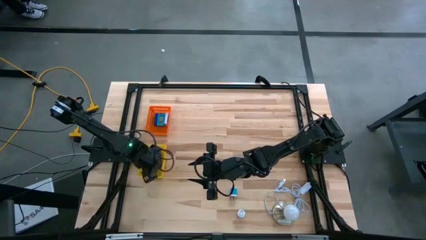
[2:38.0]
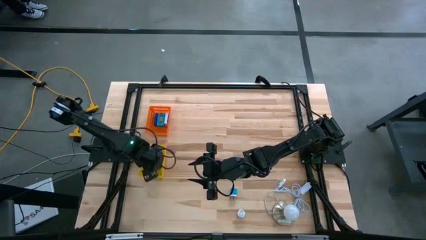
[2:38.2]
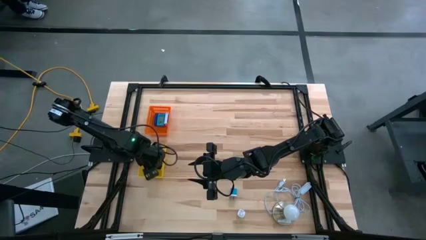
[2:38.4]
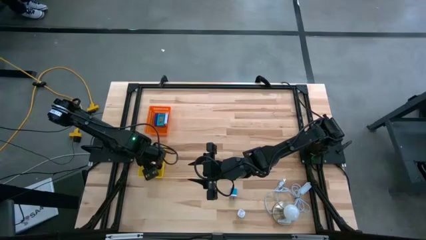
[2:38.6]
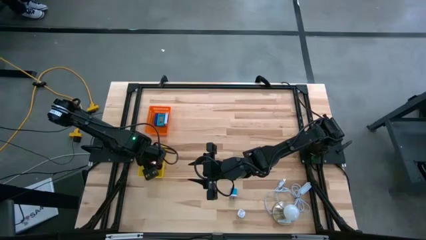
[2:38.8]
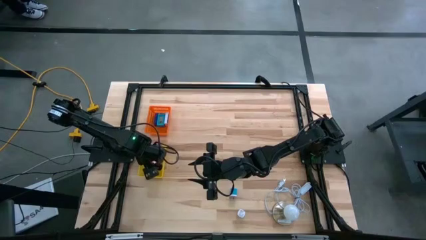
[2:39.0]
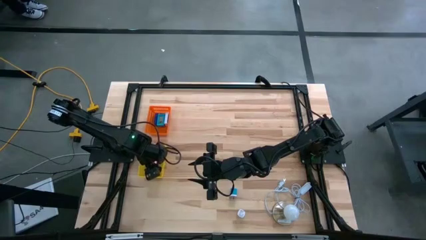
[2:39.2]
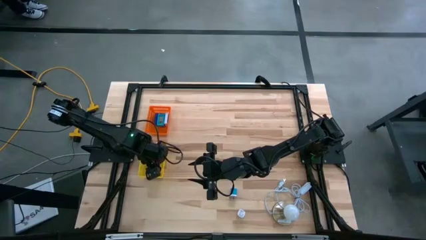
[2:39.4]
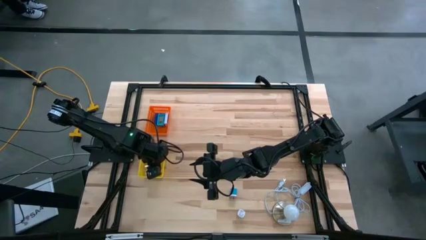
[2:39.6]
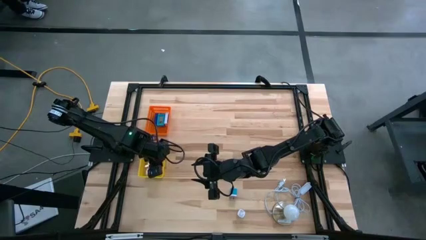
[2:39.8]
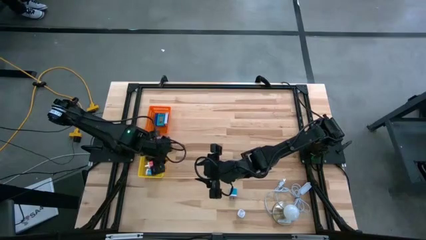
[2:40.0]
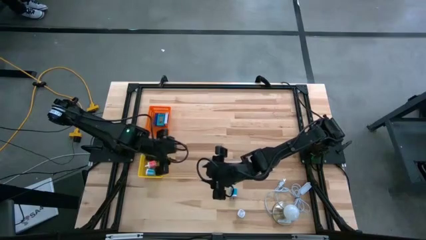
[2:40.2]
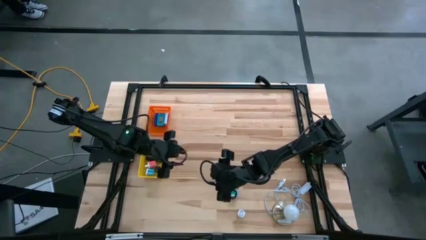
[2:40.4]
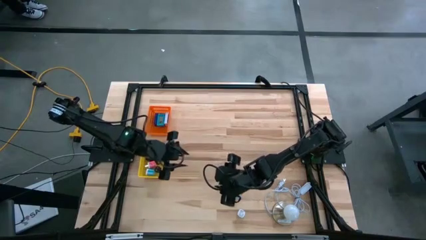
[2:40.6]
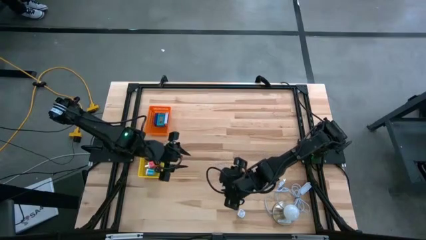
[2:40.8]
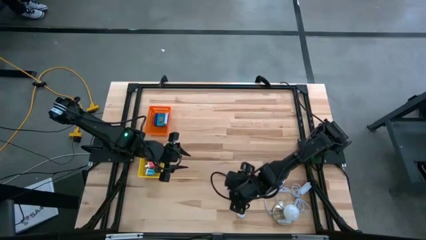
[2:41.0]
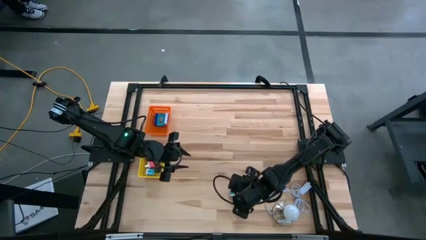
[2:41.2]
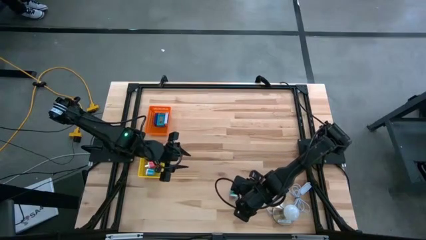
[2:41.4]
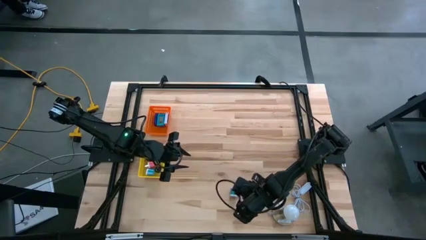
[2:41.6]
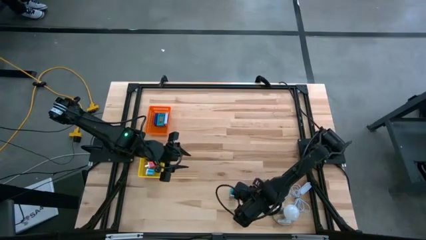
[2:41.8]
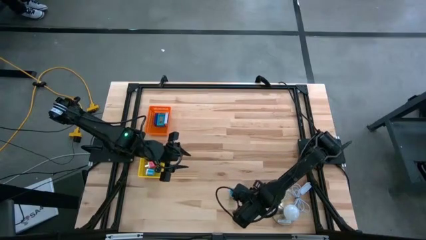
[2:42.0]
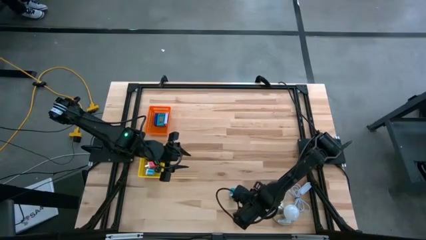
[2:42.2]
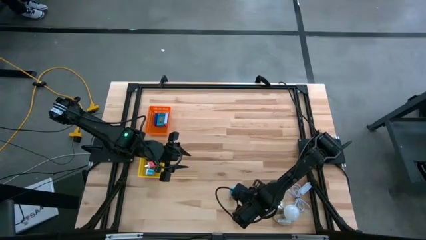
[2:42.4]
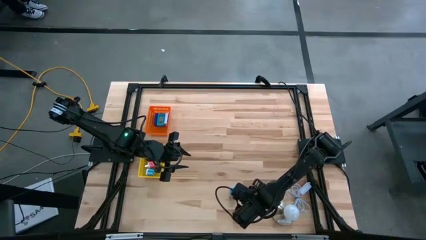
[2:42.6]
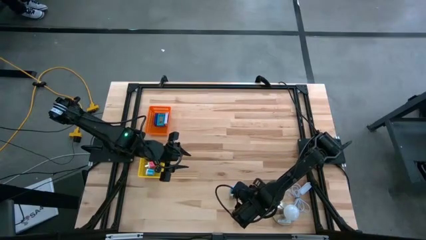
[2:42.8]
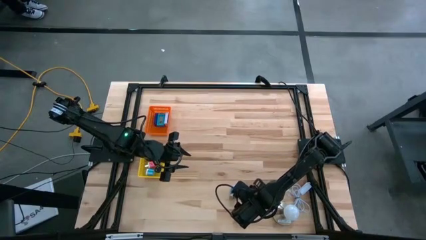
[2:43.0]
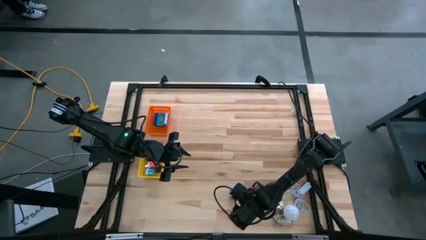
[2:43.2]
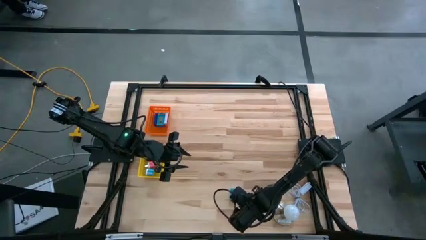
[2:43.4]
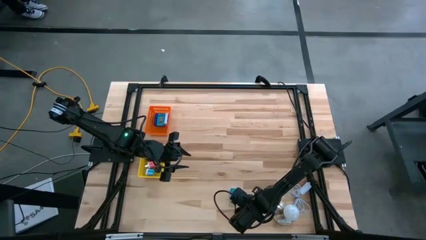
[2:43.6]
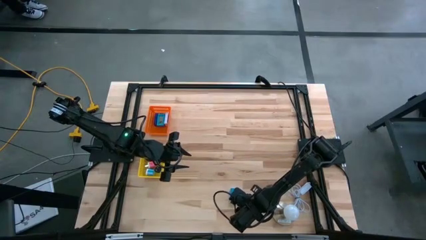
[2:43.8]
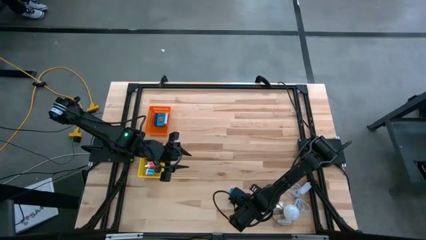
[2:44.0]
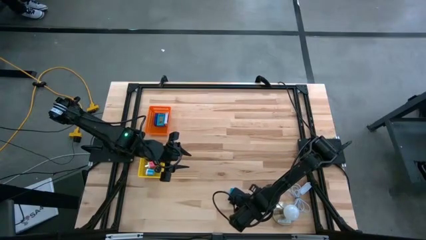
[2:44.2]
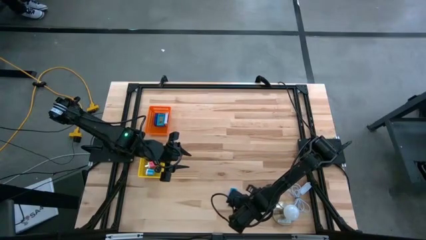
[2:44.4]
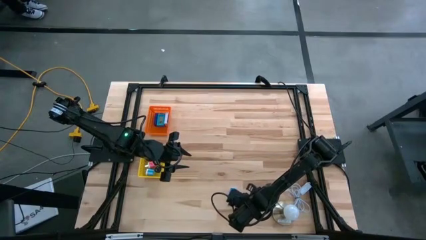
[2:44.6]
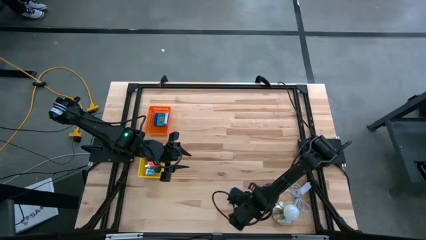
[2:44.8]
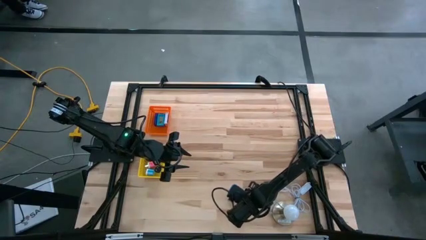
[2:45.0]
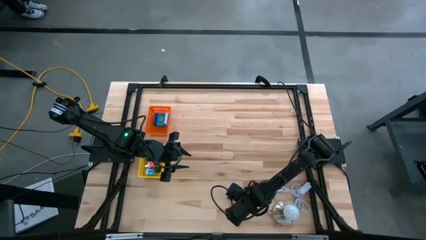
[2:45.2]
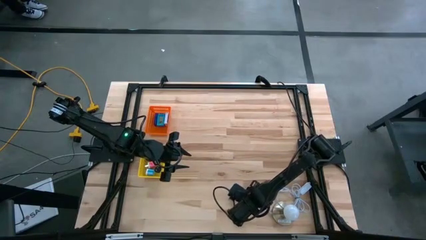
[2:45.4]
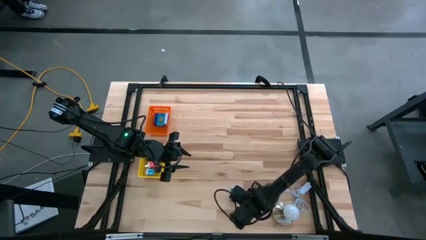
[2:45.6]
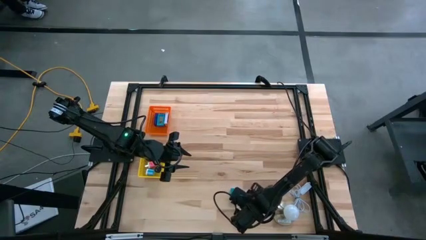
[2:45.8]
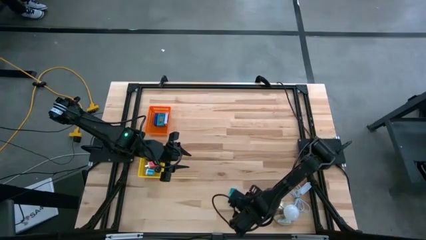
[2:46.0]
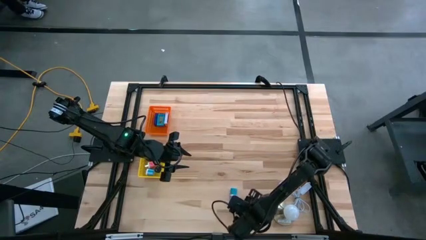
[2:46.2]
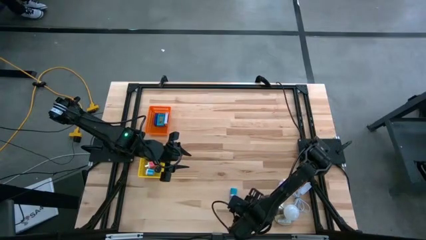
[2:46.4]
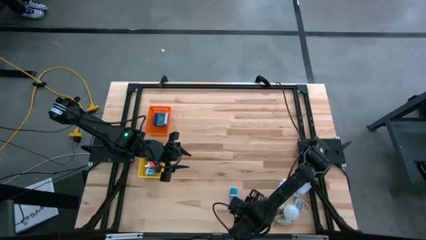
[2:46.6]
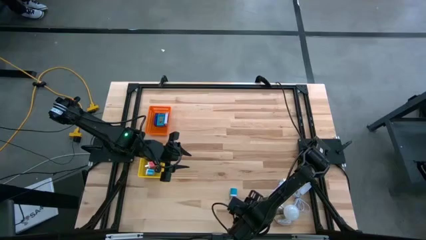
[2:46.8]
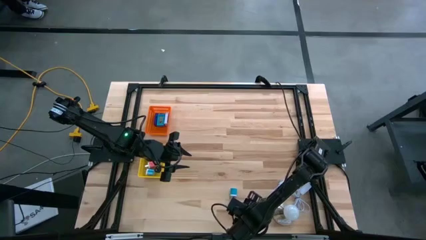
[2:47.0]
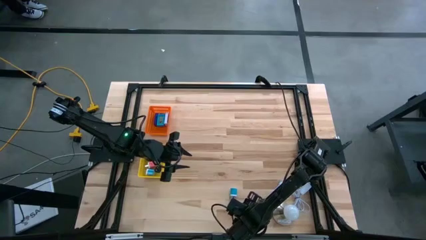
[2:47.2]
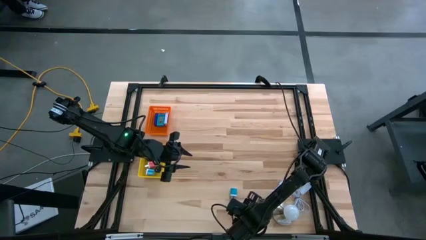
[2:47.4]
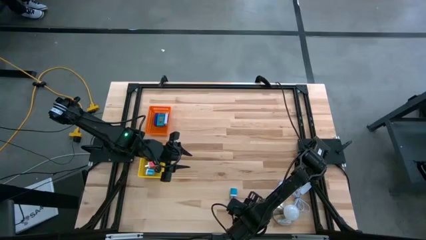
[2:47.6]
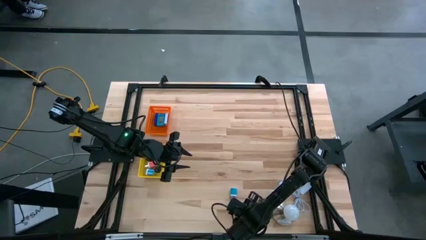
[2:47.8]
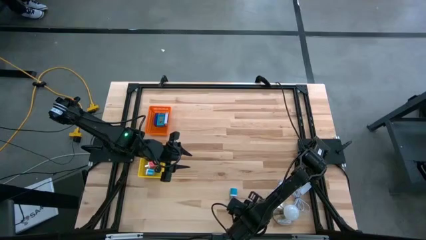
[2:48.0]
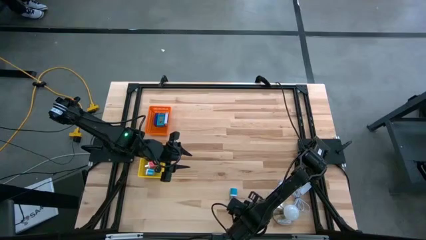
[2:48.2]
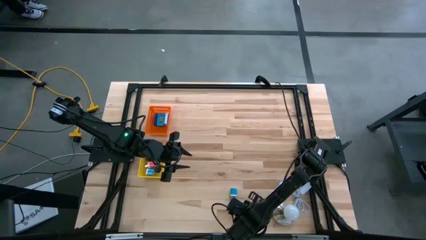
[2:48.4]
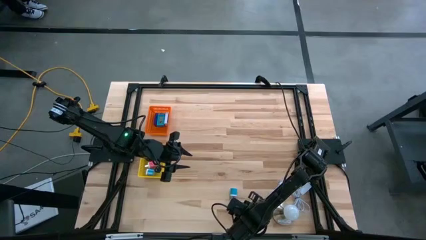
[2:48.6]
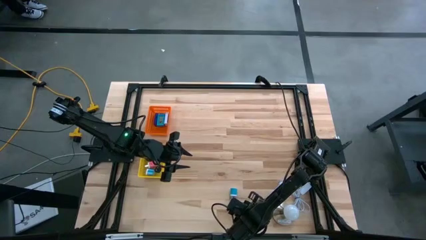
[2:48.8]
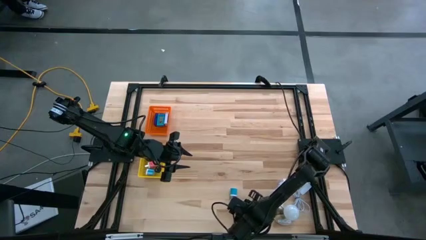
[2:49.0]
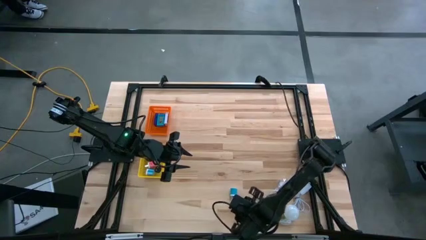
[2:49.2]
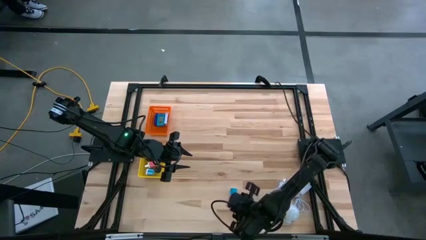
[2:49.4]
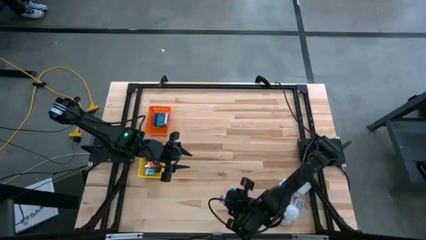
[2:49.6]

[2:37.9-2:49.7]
Task: Pick & Place Office items
Put the purple charger adapter into the yellow basket

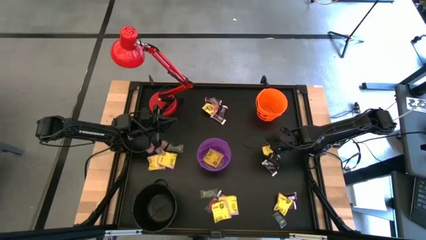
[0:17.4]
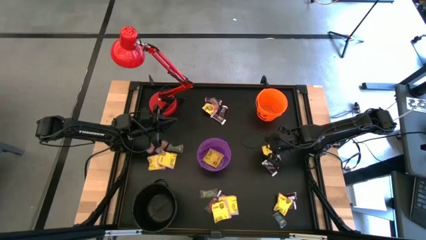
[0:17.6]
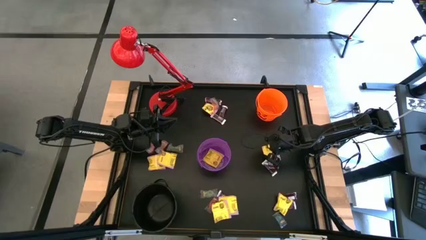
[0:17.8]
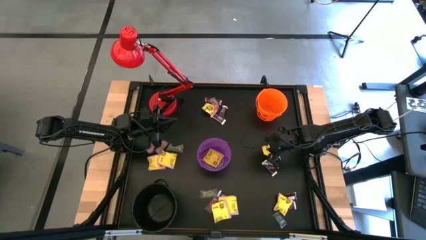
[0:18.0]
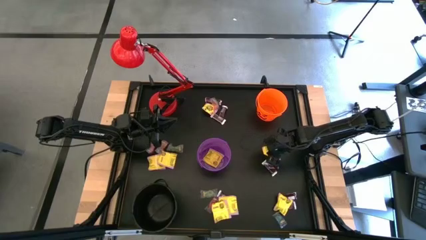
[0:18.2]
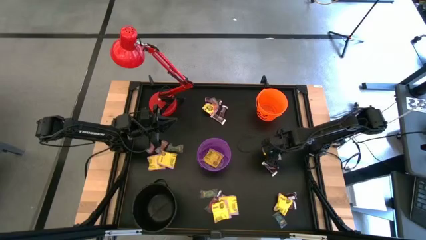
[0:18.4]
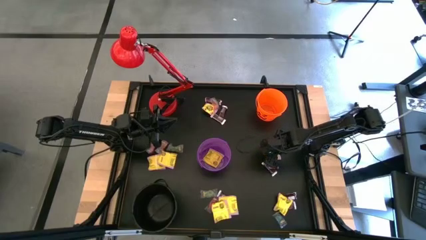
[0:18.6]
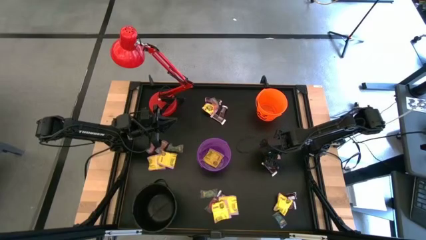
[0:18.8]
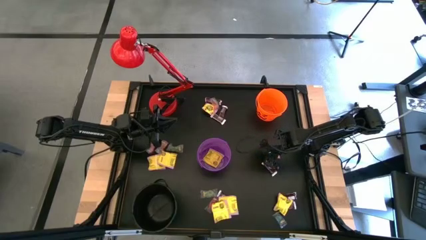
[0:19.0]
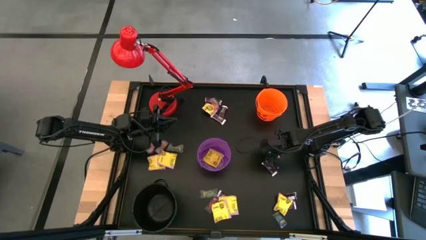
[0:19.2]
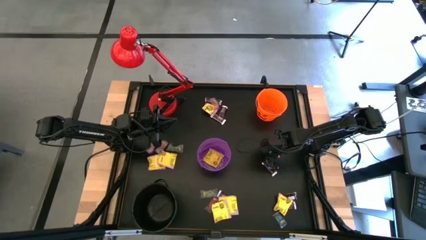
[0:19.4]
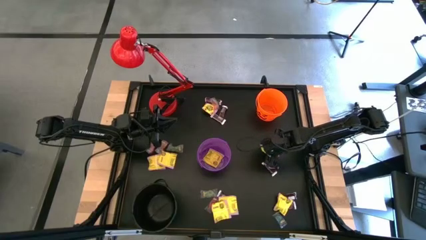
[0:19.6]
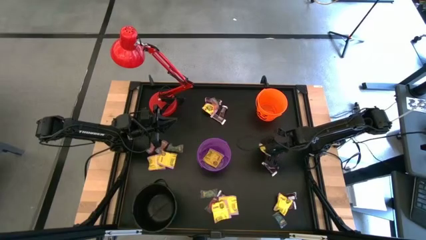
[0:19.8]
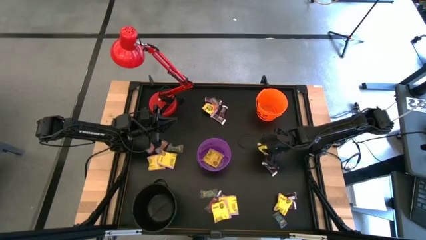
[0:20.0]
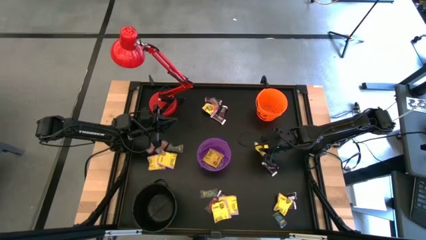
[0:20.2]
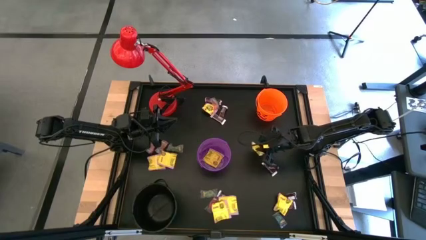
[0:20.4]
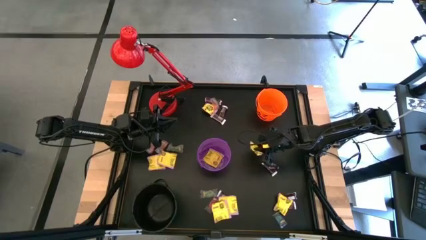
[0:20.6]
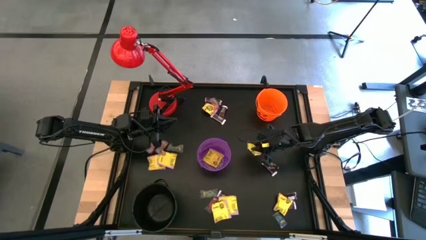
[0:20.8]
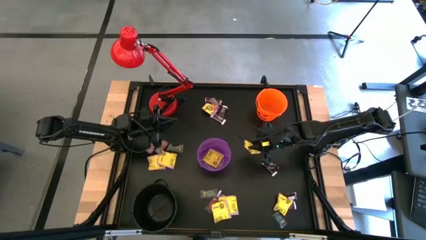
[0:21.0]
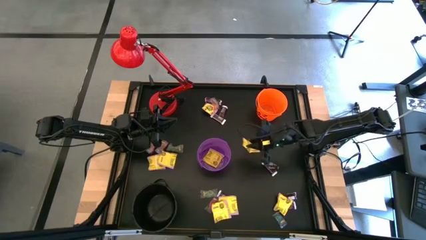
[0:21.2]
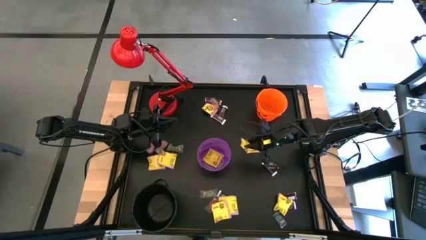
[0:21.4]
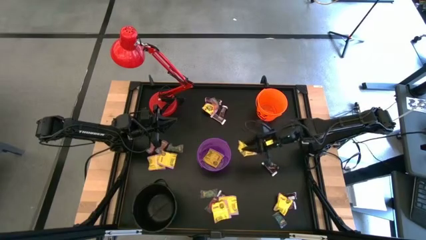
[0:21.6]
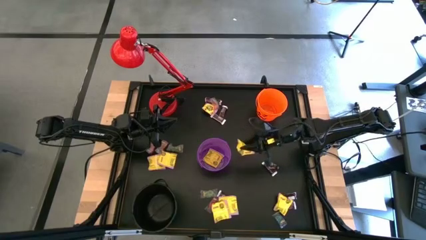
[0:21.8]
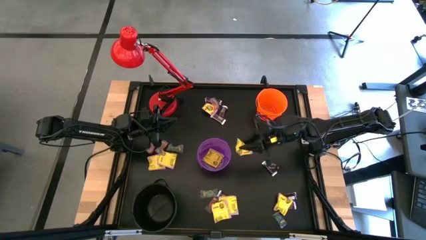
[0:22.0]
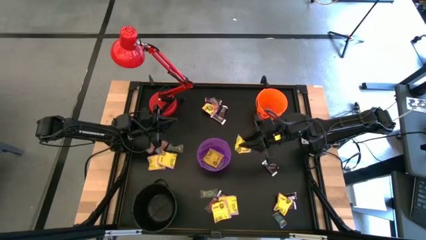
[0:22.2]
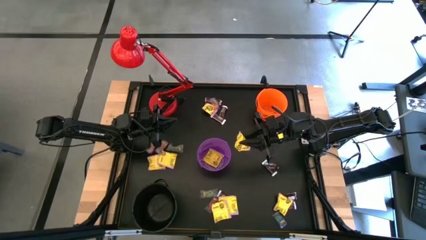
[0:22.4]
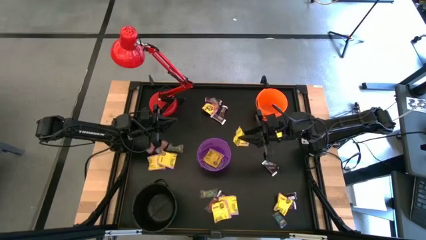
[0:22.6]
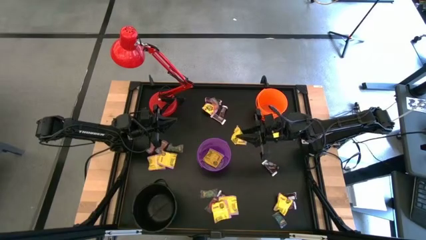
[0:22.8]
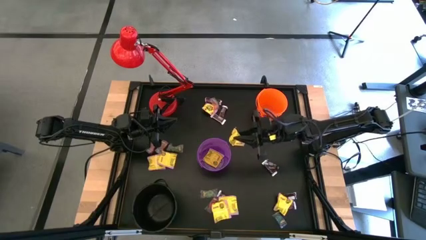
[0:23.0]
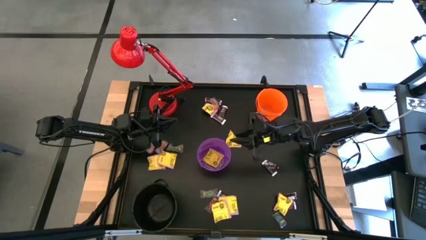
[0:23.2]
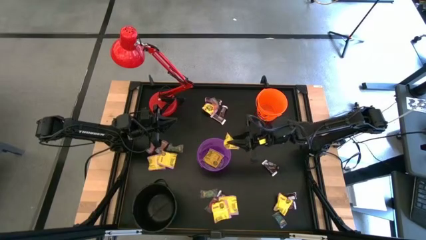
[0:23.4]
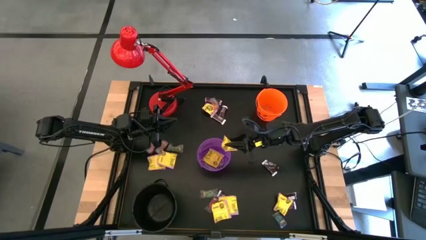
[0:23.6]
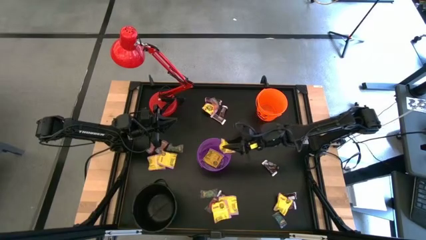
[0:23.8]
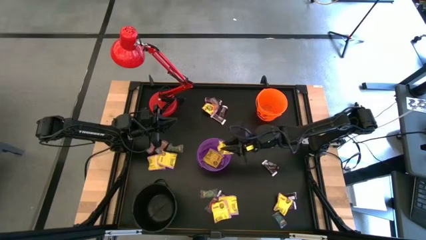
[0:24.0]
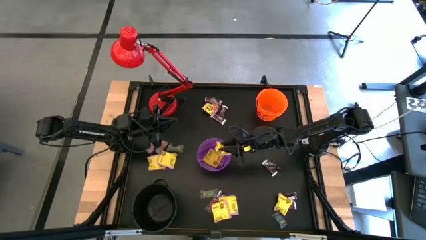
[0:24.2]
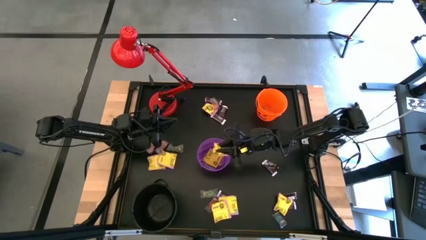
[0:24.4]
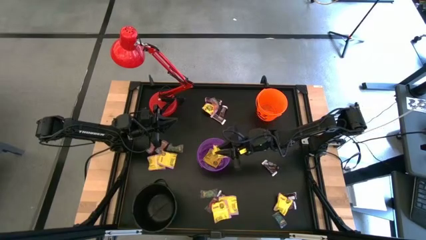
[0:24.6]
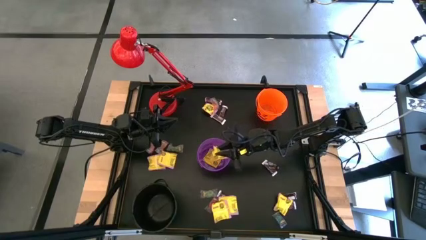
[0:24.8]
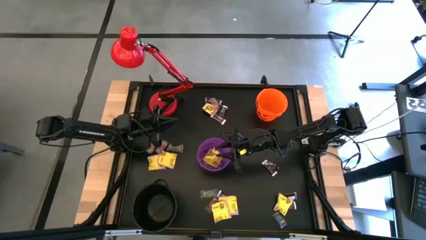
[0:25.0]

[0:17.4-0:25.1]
Task: Sort candy
Put the yellow candy into the purple bucket
